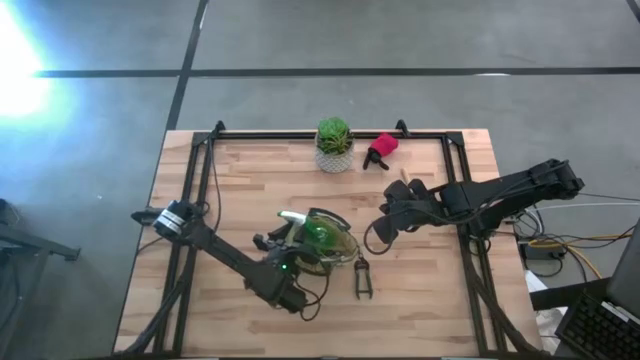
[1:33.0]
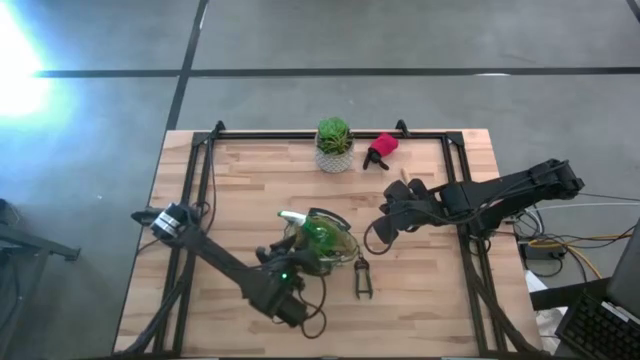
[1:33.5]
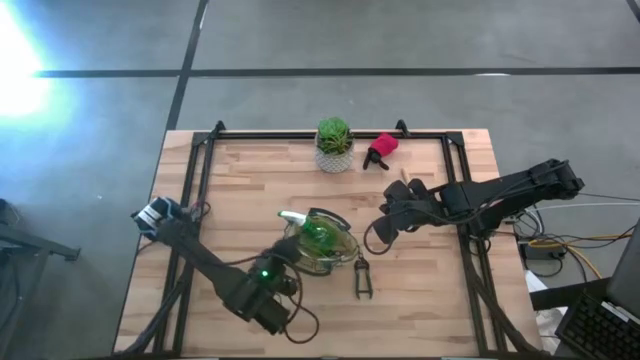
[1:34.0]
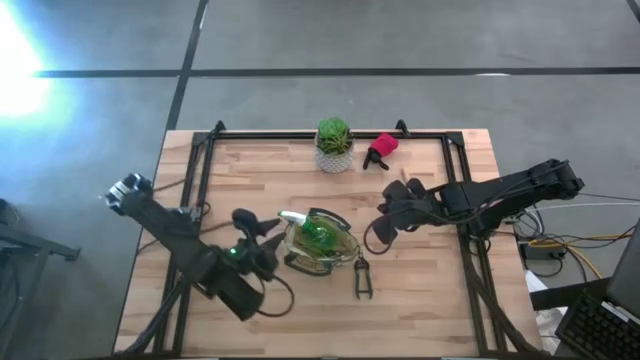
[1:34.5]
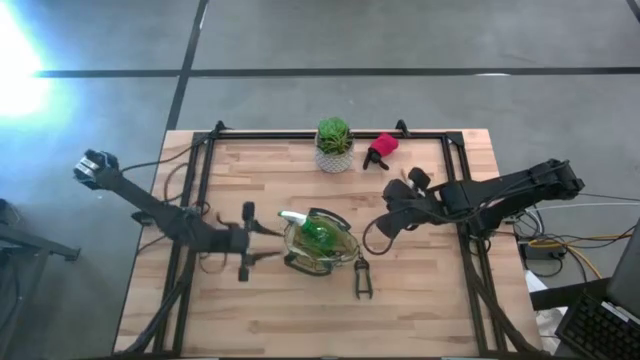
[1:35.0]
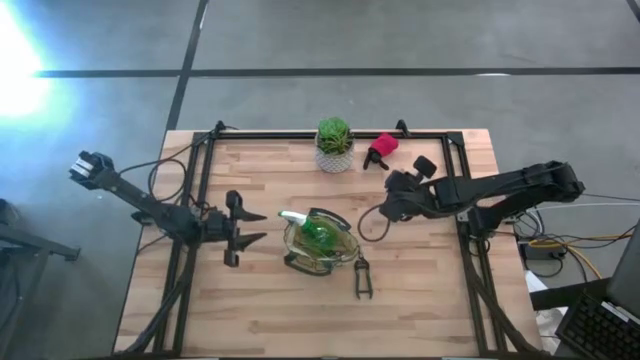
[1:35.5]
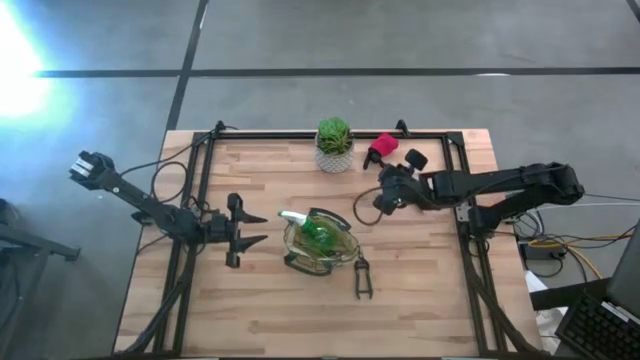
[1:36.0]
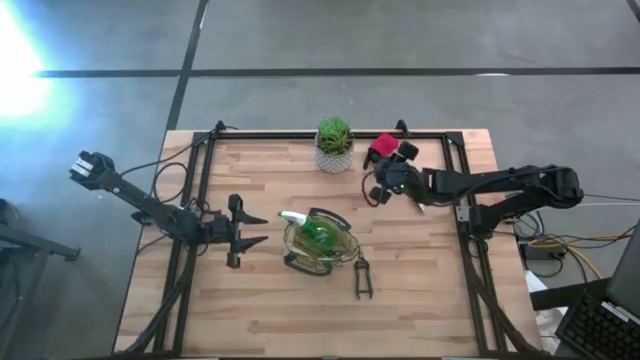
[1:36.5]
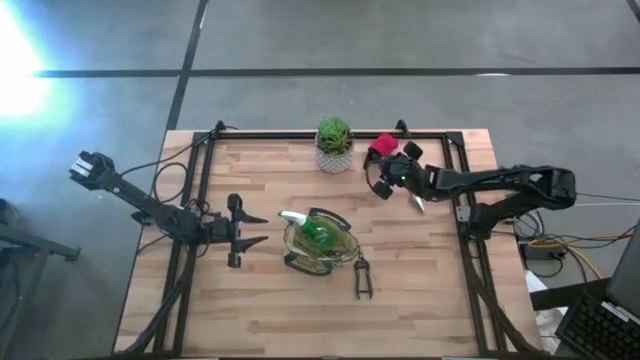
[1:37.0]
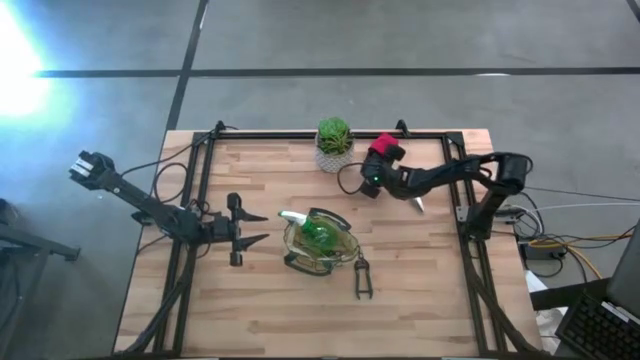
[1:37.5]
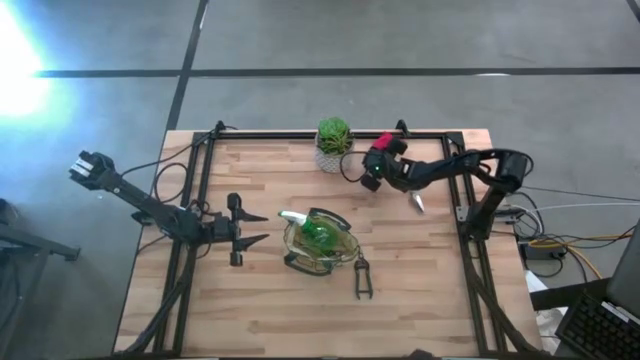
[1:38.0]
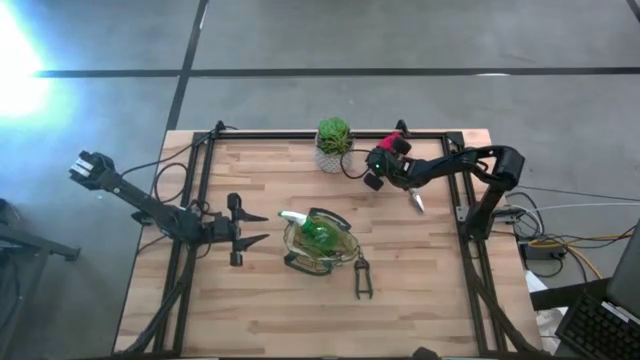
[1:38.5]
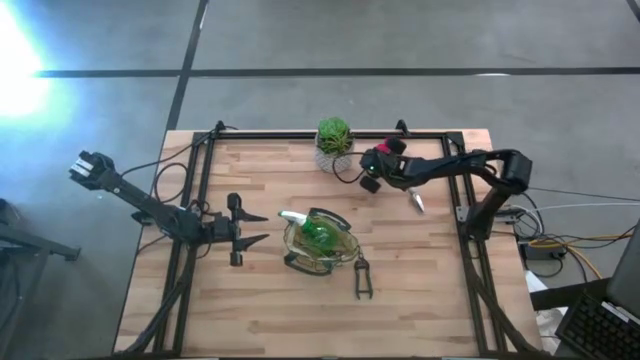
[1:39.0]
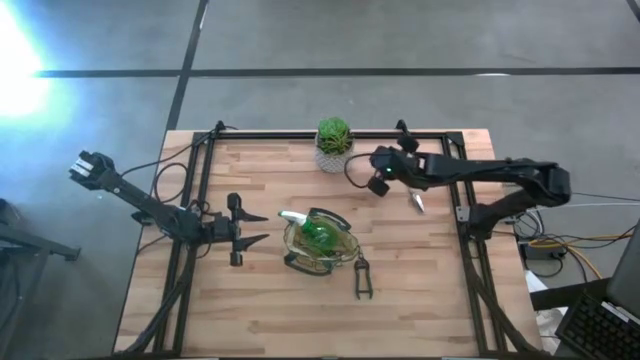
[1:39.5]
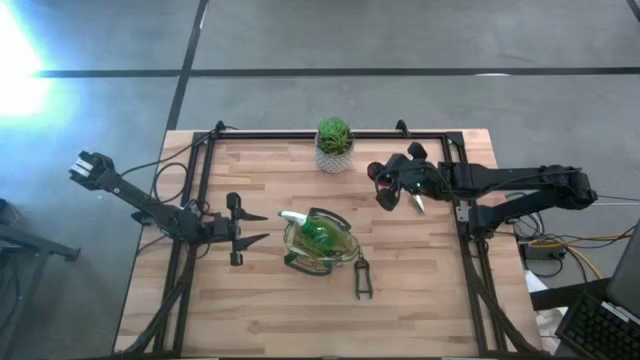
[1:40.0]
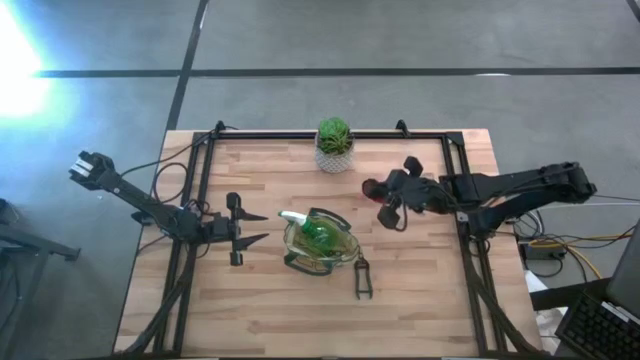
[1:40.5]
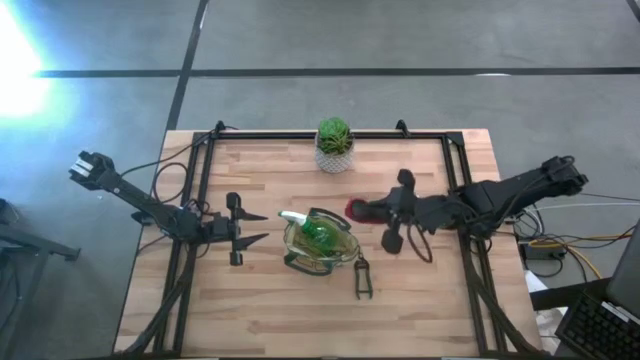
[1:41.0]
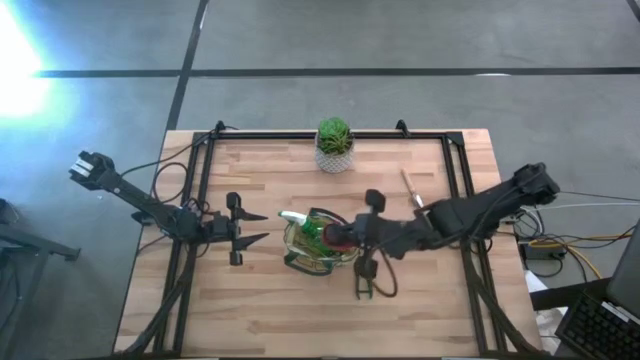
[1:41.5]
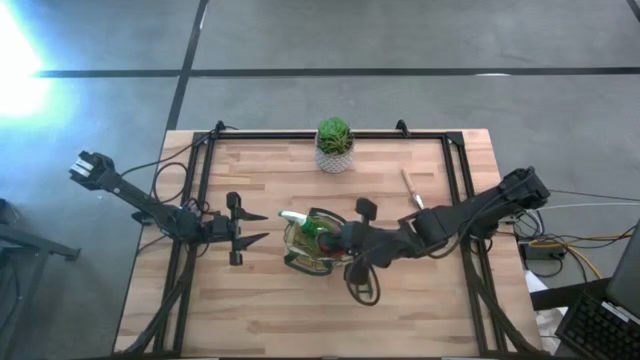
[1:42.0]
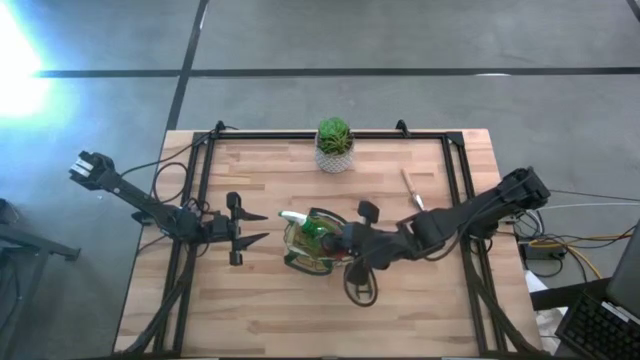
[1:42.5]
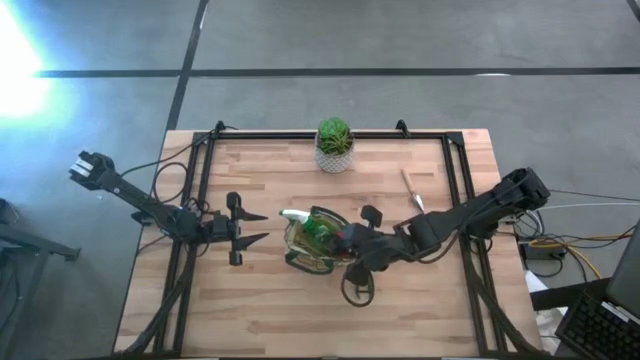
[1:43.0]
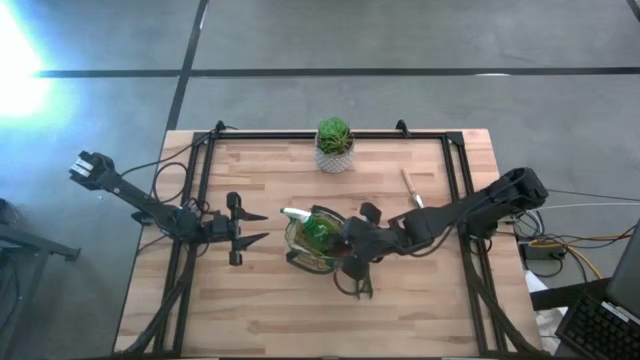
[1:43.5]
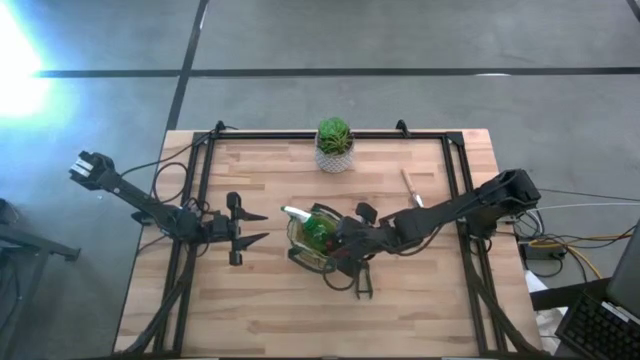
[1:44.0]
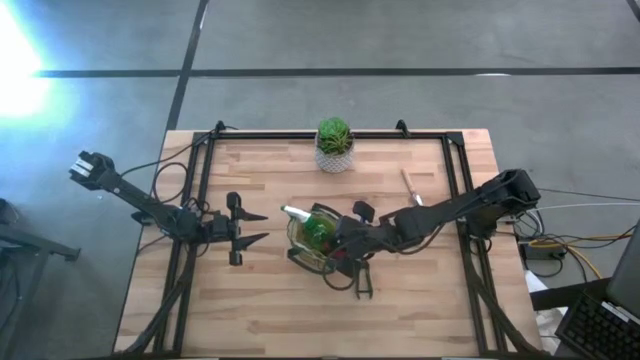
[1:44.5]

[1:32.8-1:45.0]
Task: Pick & Place Garden tools in Gardening bag
Put the red and black gloves into the white gardening bag

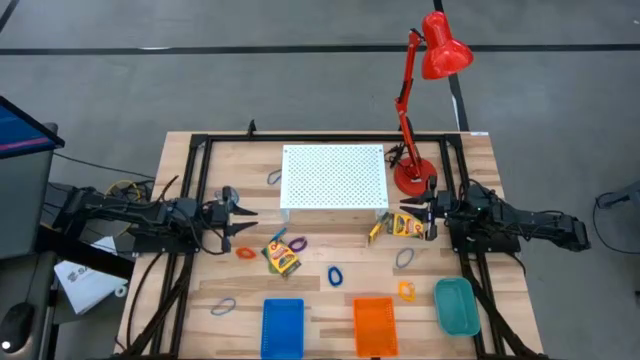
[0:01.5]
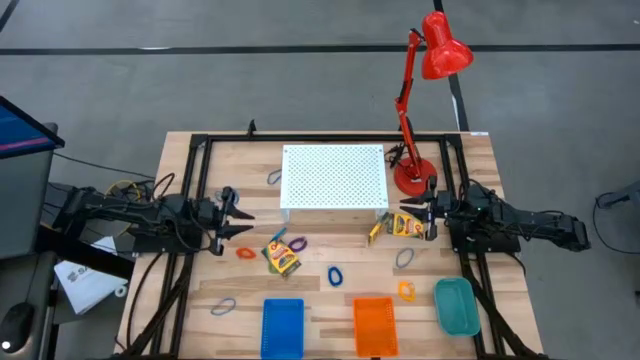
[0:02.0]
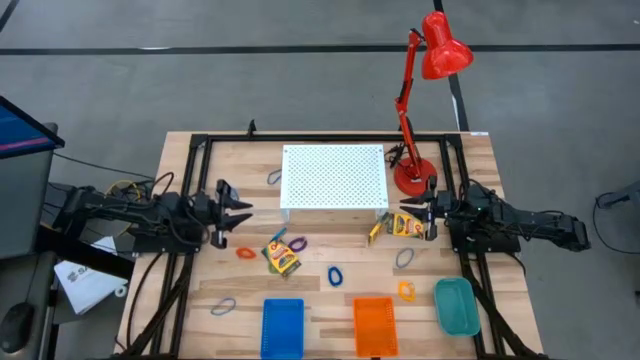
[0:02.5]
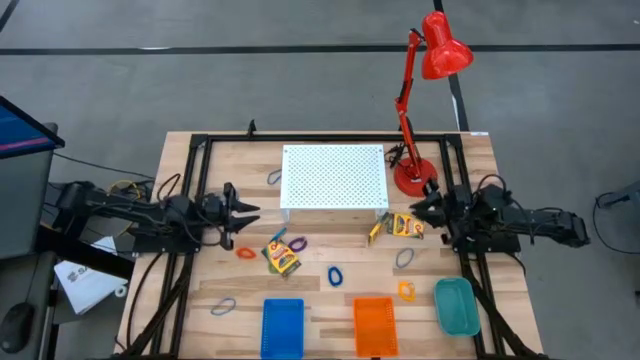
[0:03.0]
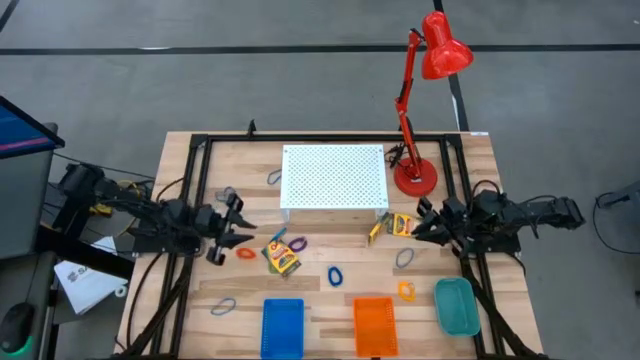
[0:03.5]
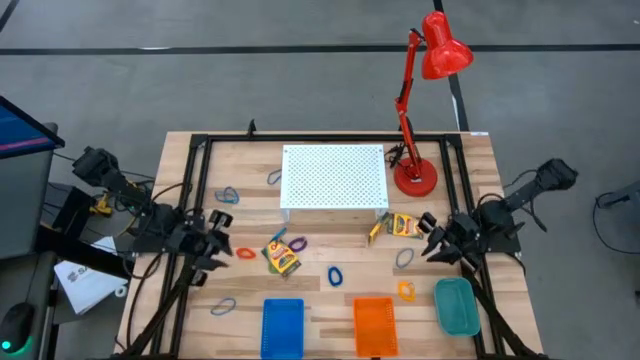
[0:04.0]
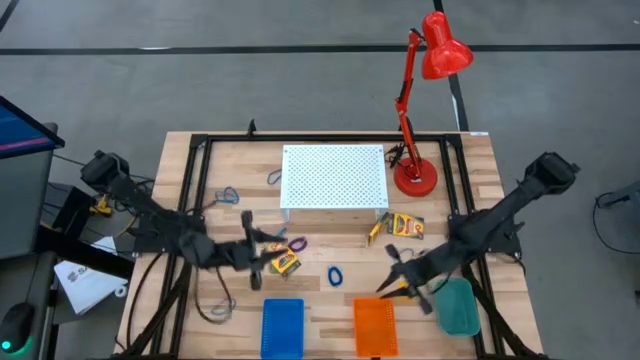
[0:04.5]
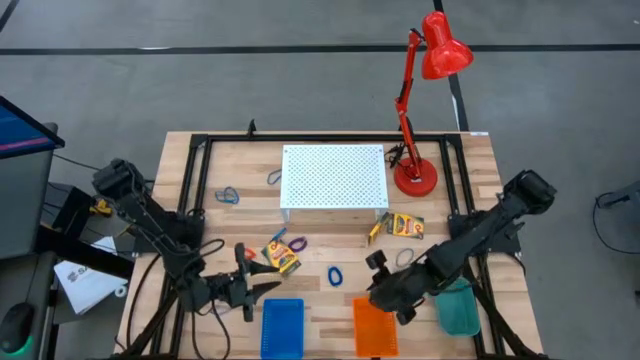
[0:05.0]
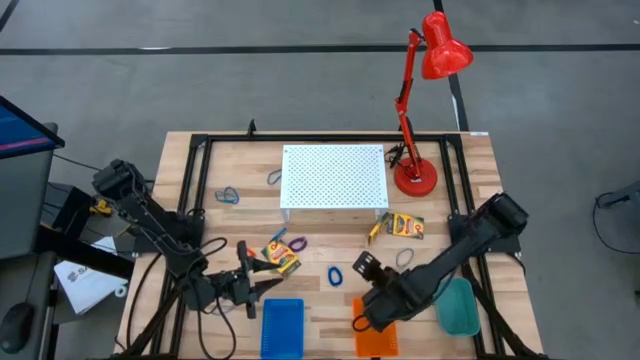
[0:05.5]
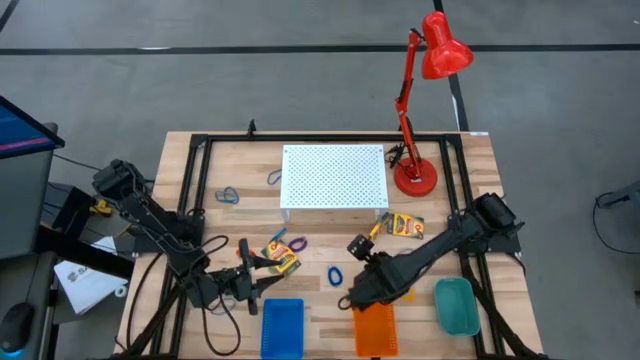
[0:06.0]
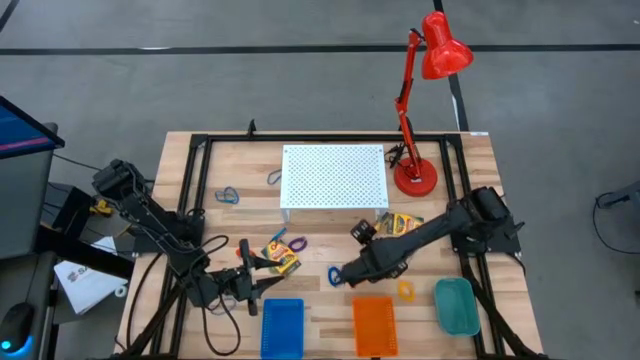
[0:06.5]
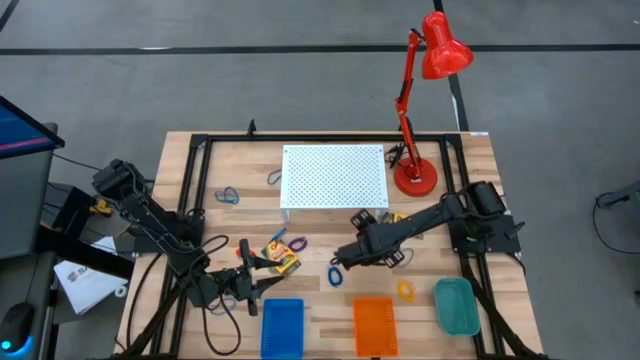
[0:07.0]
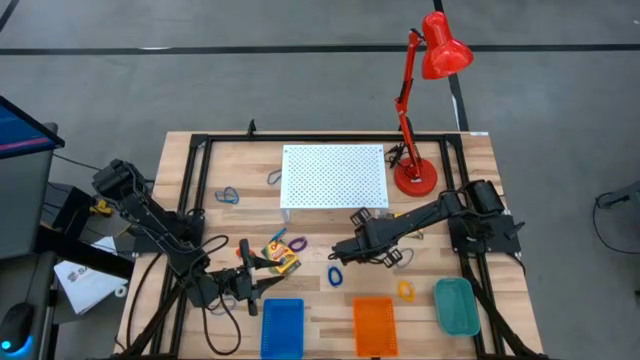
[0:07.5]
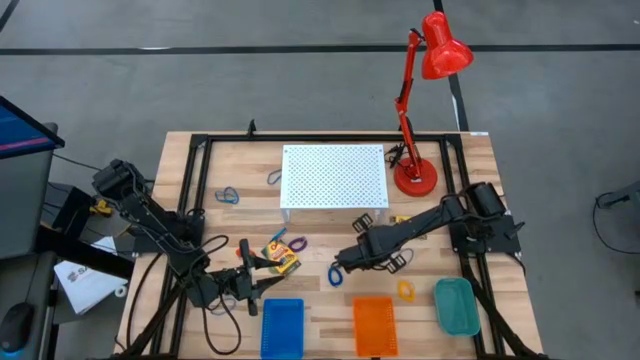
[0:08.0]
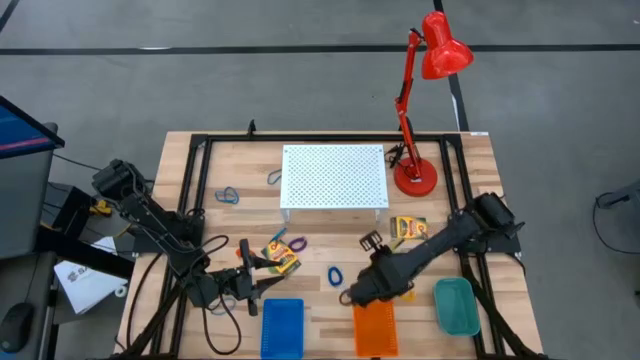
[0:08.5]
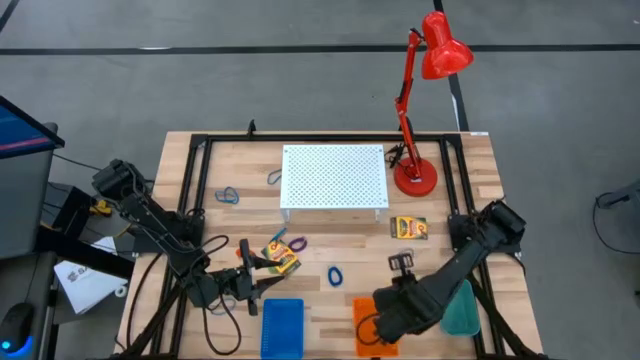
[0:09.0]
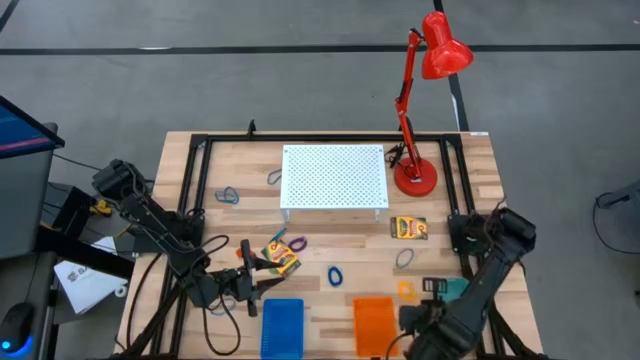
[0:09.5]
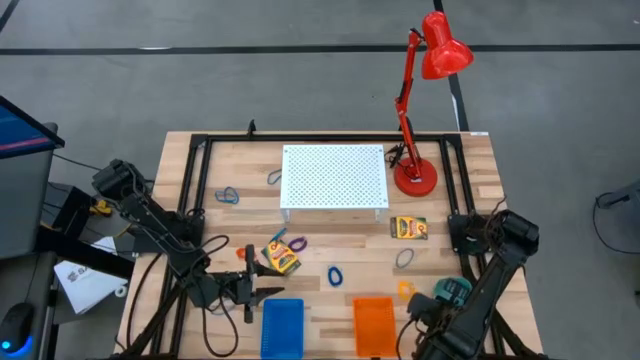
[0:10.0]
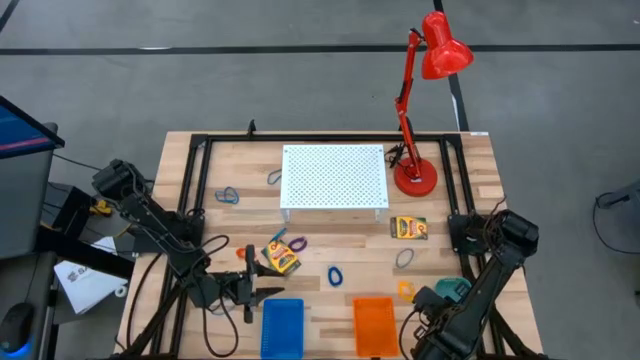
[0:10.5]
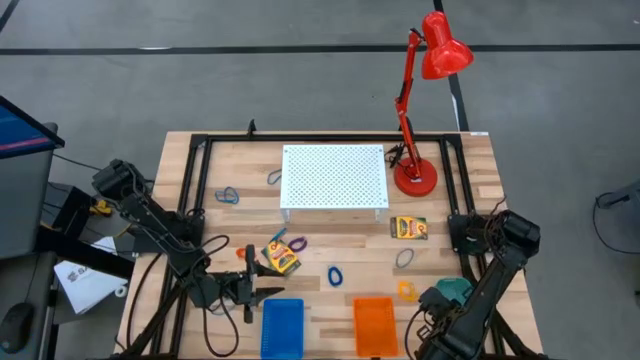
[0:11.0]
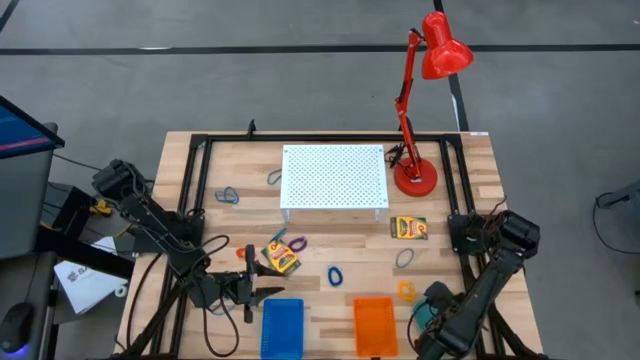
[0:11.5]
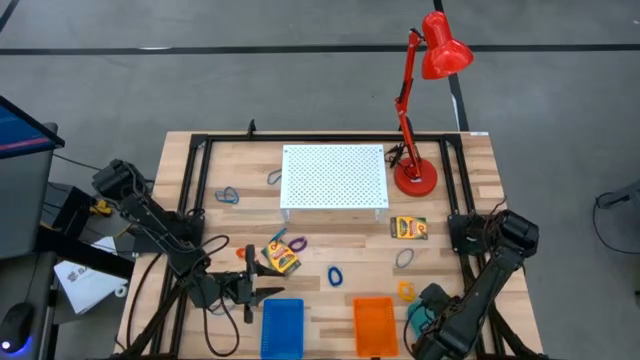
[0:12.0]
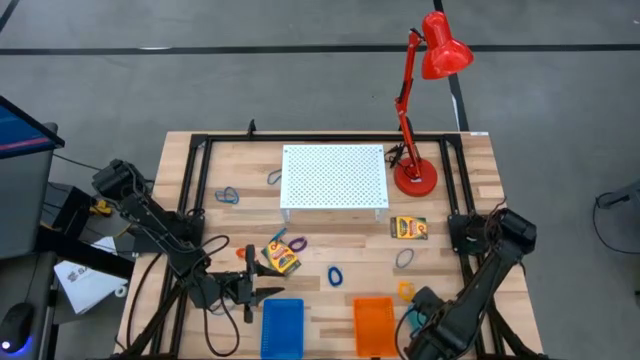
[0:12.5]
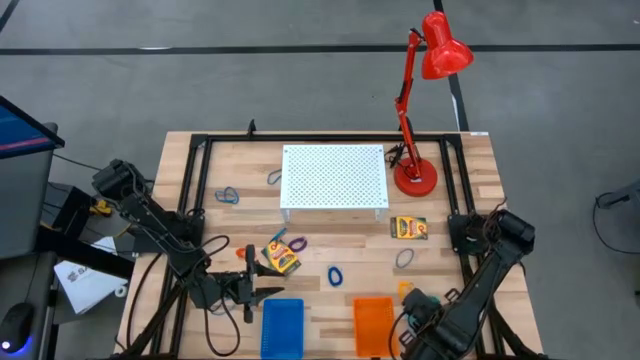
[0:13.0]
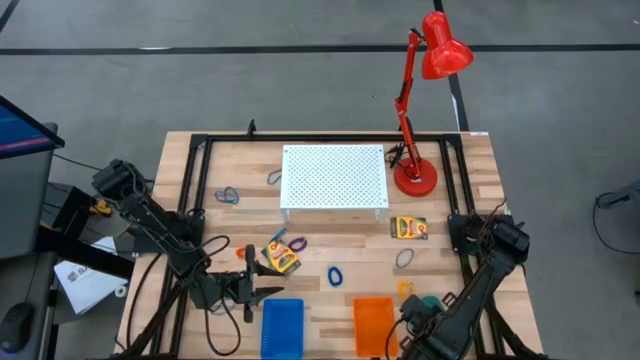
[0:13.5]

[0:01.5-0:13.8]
Task: Pick & Place Office Desk Supplies
Put the yellow crayon box into the green bin
